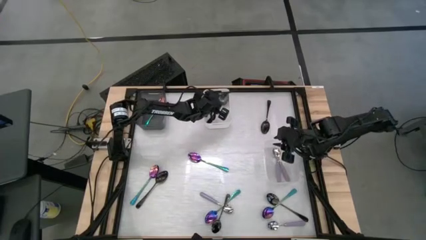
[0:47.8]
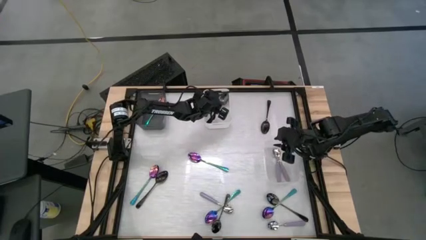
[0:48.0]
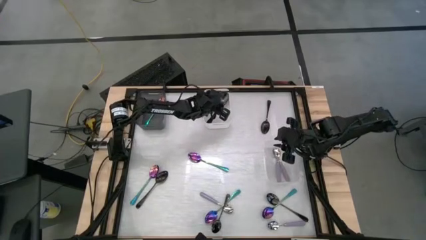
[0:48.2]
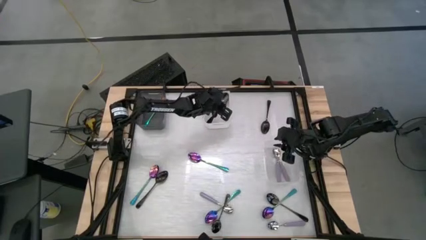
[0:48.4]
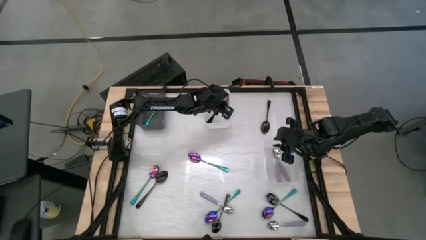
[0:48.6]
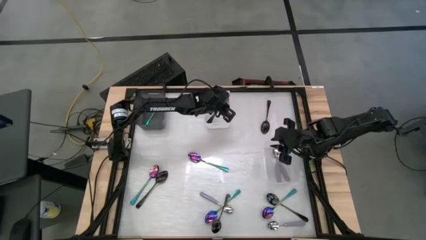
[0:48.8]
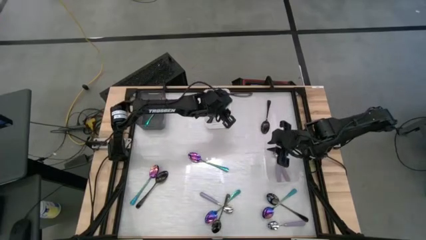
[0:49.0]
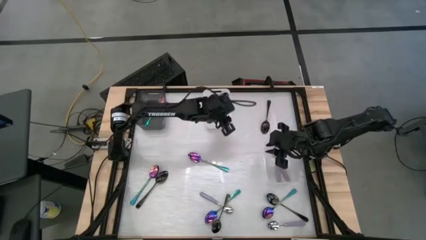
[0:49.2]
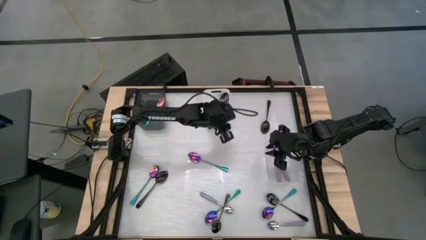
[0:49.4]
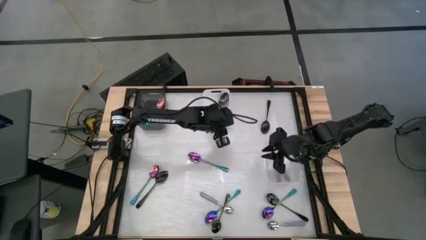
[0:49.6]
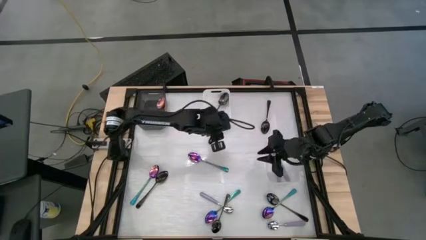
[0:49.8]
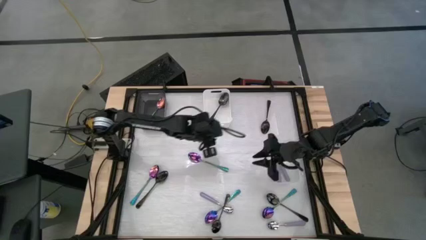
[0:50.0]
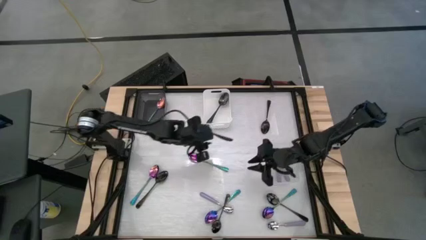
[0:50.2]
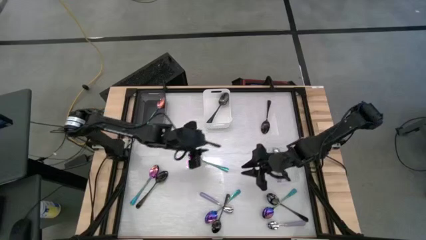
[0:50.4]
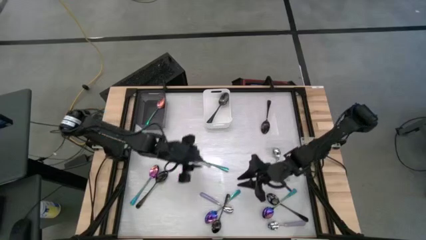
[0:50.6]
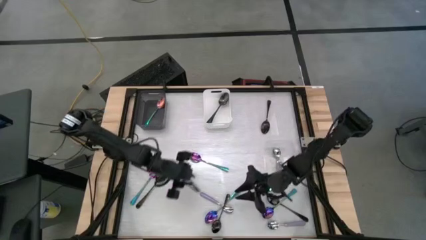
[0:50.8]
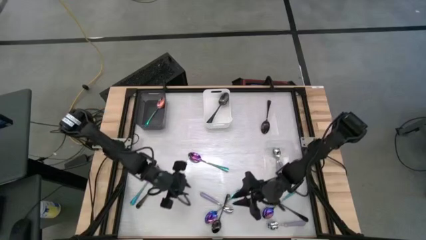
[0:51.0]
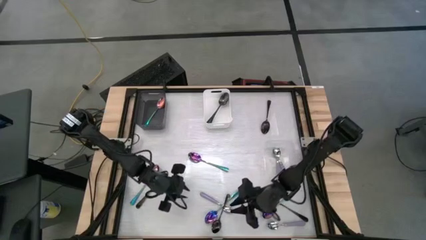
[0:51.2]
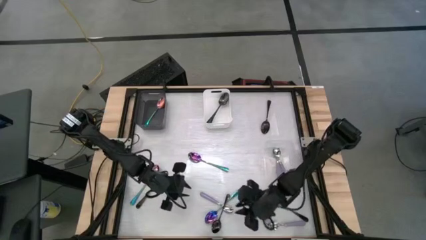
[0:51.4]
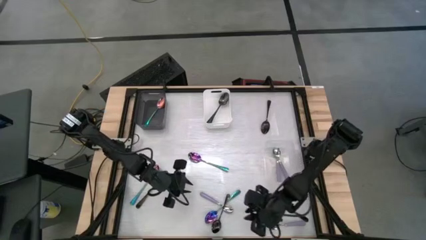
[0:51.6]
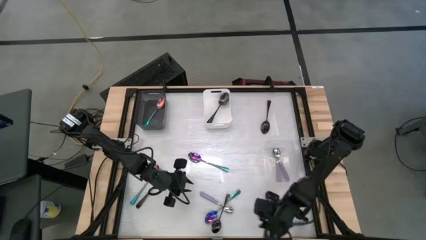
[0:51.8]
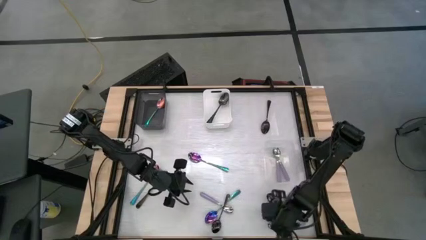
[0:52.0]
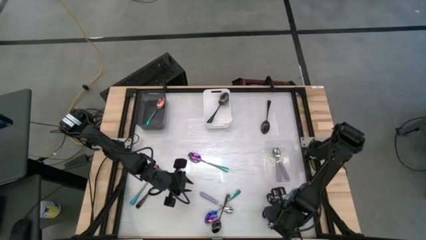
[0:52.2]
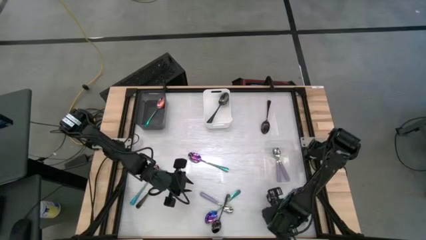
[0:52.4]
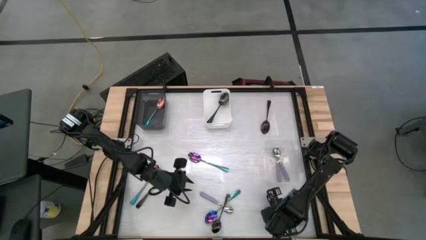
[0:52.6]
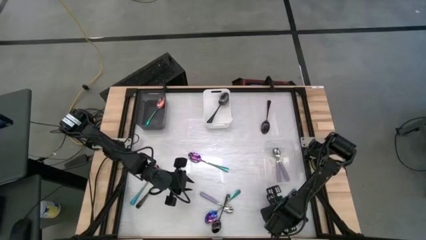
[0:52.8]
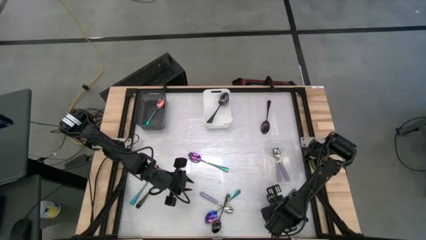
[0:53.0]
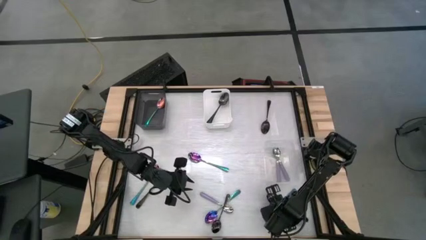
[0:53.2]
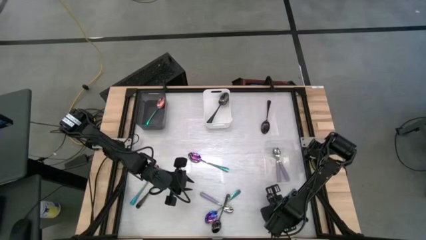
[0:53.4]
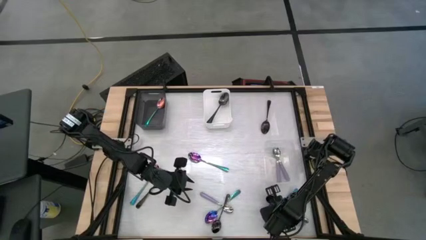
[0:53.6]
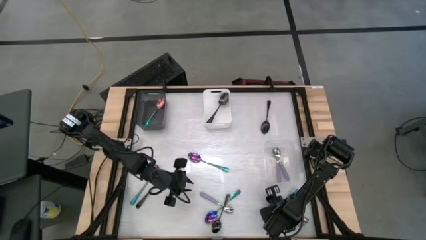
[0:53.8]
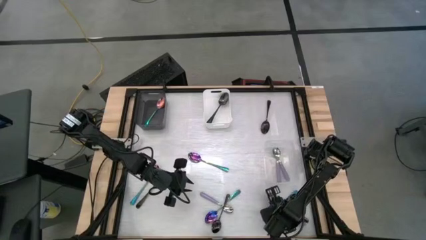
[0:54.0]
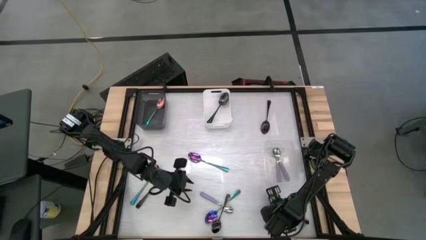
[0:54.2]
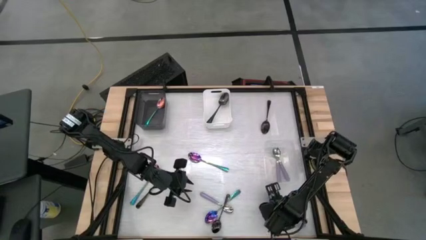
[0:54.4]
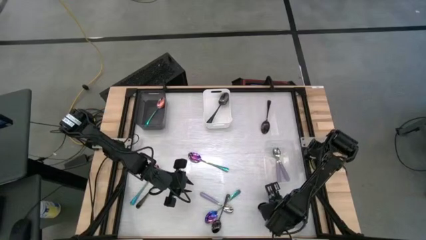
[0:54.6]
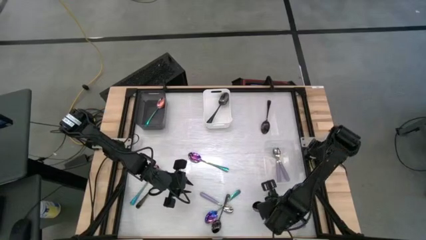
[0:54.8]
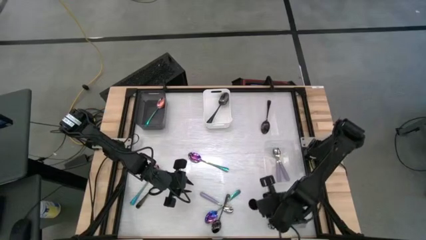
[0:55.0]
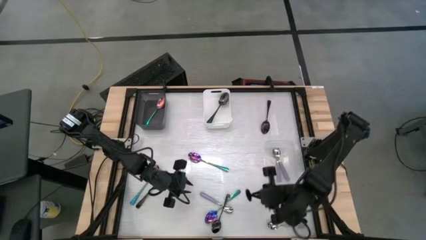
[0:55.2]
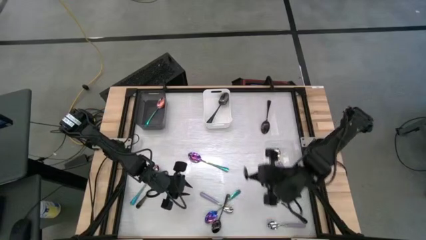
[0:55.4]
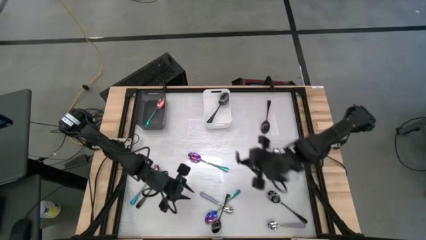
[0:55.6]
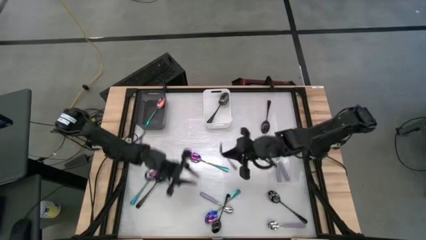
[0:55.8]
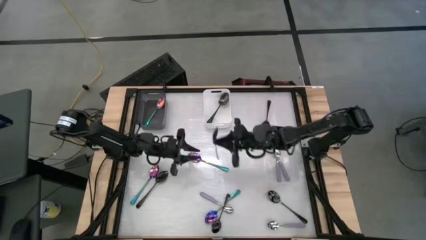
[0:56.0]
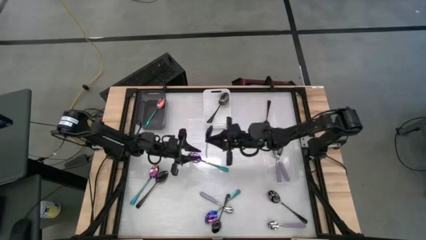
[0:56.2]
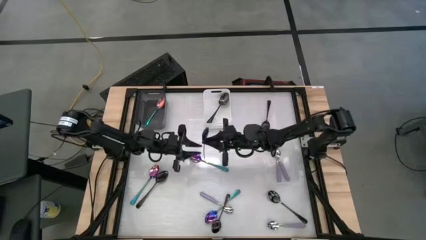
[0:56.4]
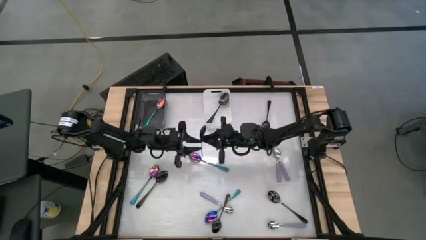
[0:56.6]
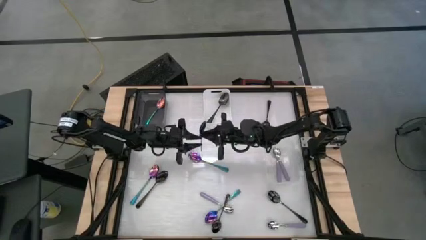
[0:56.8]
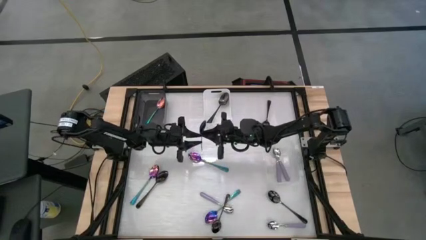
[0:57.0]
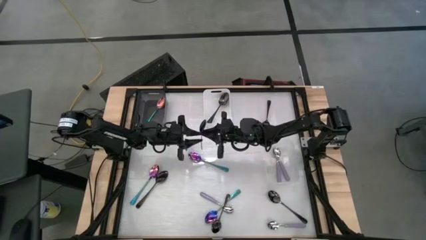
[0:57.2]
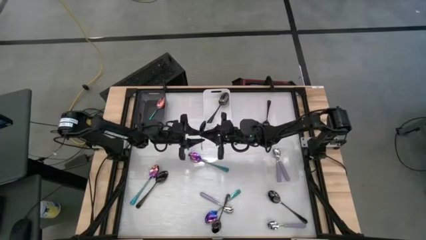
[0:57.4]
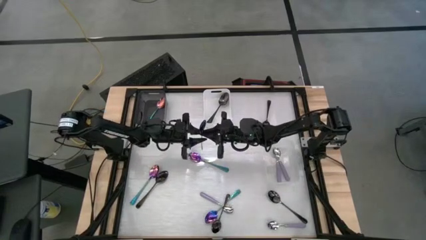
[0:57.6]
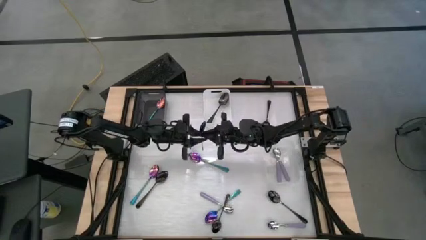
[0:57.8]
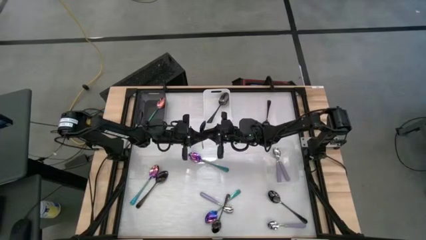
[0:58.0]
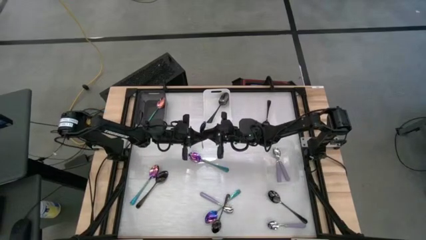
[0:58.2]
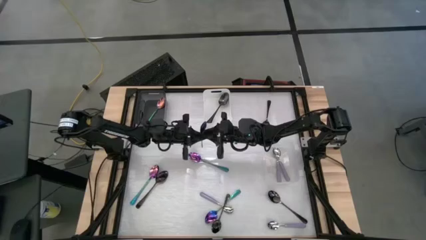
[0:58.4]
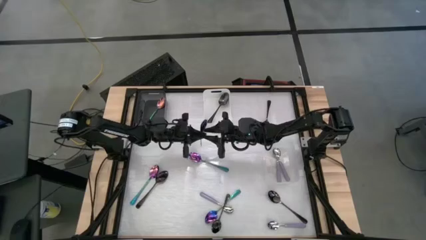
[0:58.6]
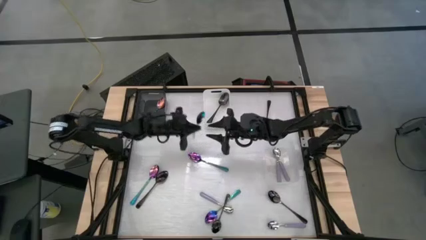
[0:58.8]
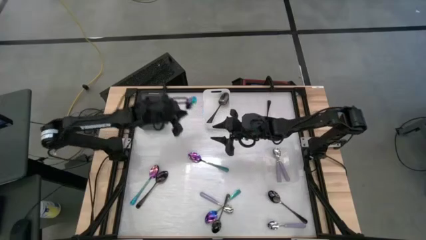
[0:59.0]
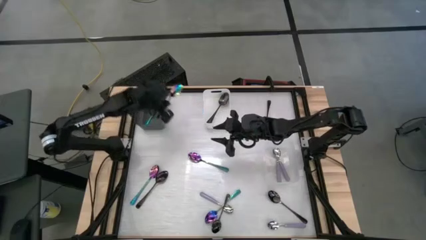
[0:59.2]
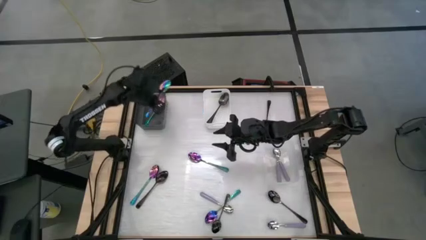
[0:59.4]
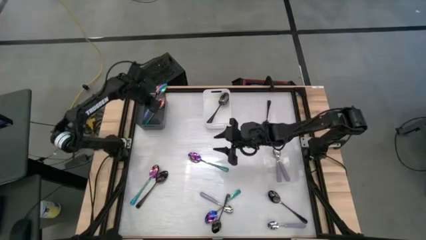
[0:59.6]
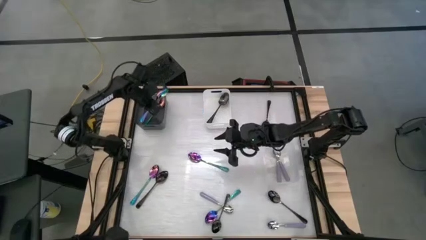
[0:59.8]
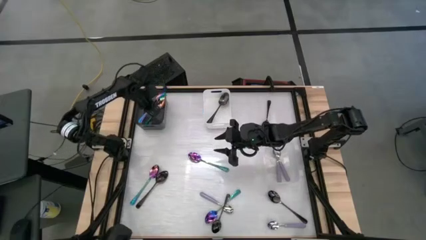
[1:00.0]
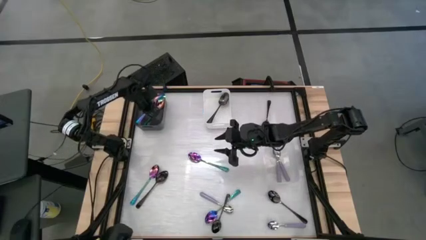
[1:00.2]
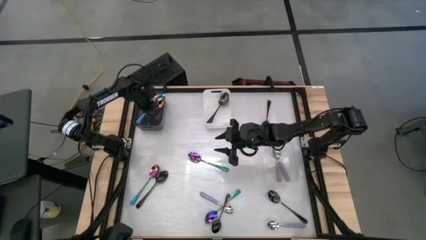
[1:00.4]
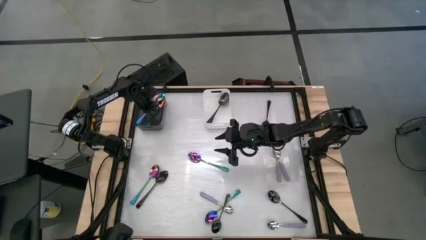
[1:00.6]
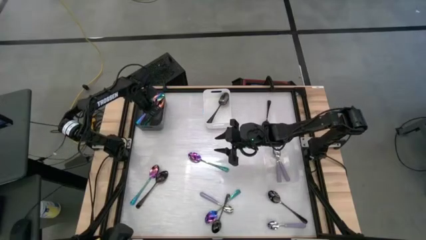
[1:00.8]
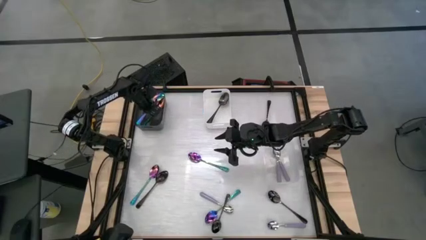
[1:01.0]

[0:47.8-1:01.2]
Task: Sort silverware by color (type)
Put the blue spoon into the black bin

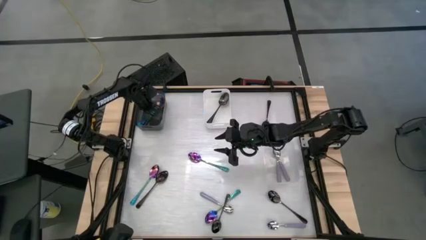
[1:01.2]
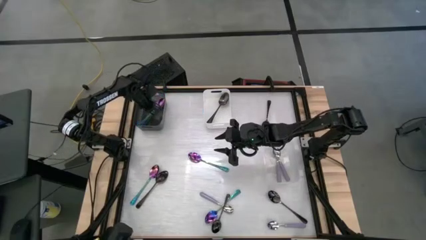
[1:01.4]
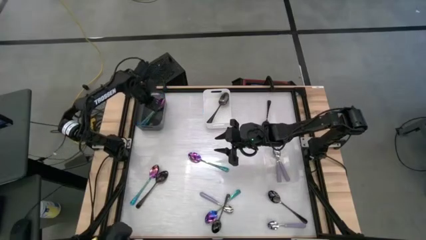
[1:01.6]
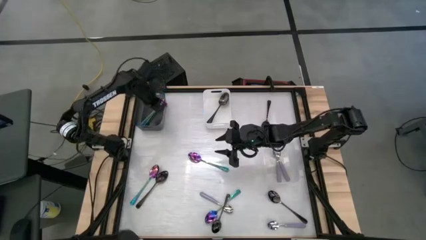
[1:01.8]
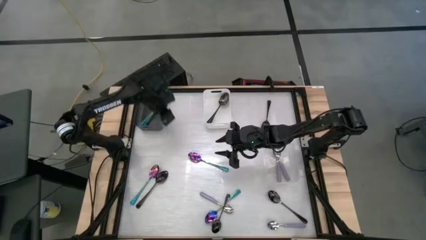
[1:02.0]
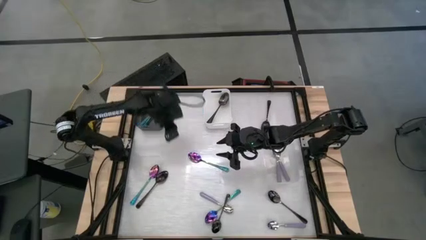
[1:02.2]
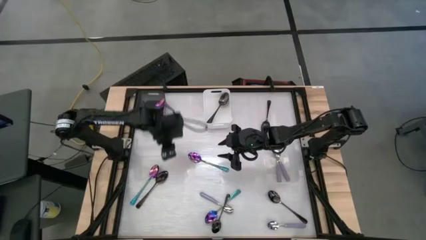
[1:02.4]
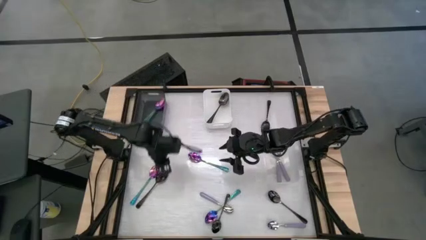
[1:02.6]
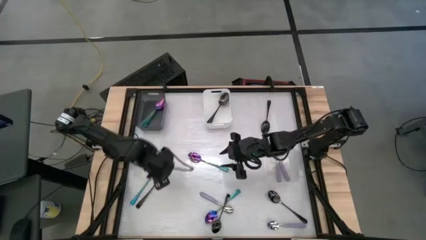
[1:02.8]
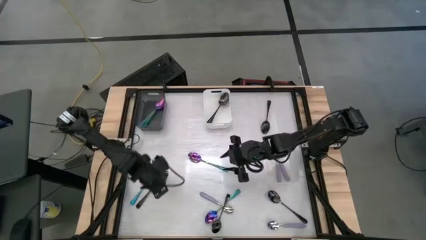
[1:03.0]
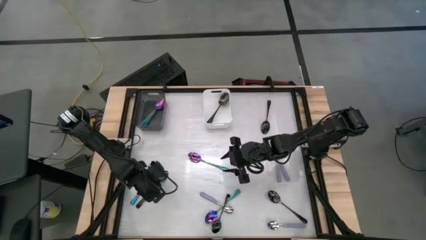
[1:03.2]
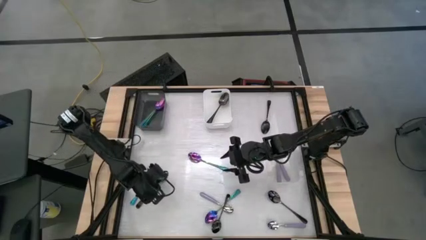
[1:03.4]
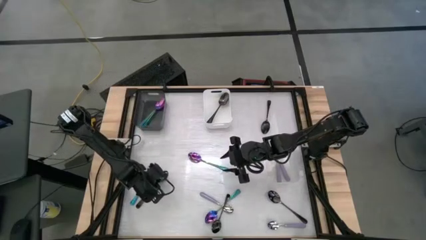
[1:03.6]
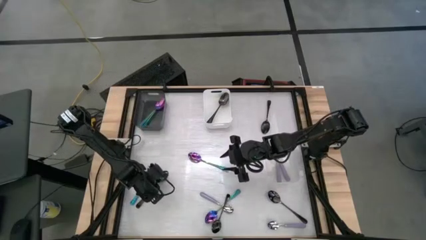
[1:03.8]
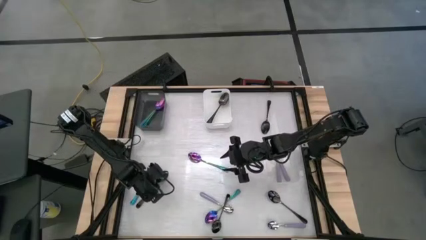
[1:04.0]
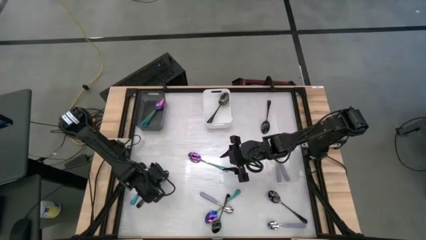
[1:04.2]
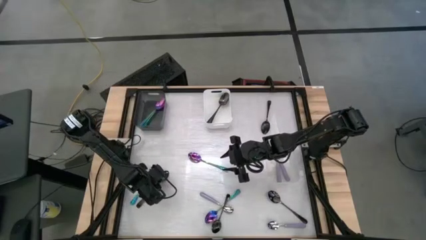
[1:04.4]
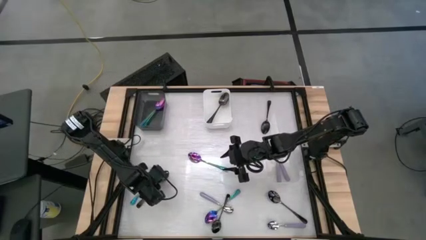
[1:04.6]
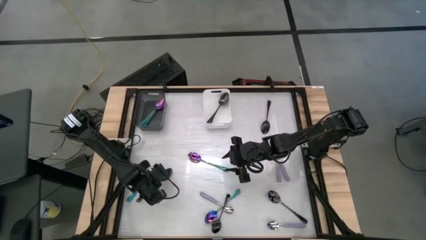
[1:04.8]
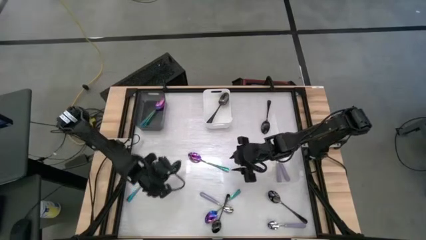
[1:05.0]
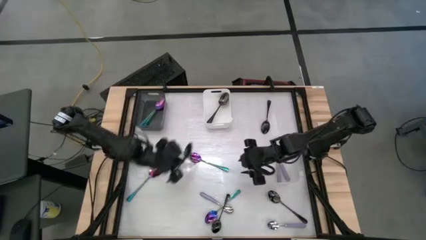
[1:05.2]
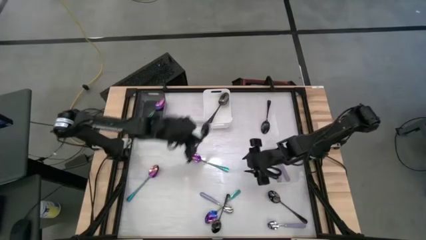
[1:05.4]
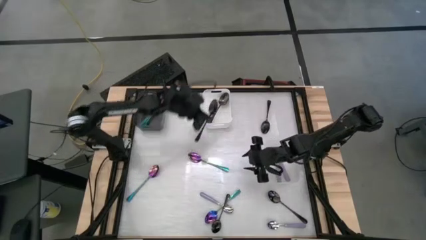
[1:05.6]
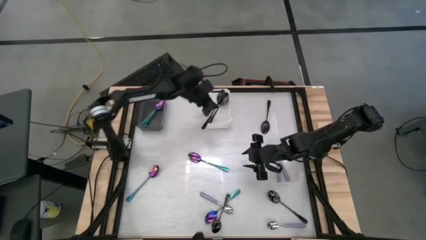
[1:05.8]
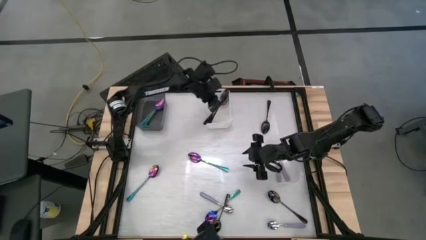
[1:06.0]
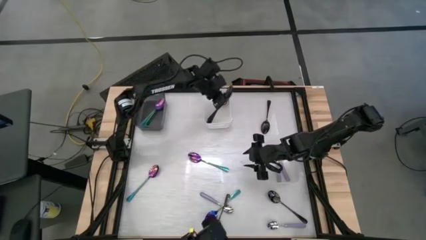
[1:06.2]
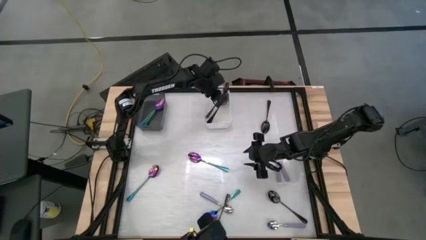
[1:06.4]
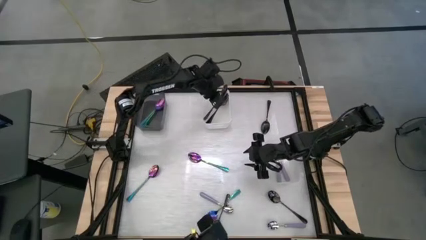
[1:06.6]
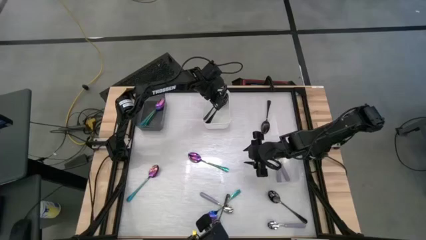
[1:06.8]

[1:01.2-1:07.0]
Put the black spoon into the white bin
